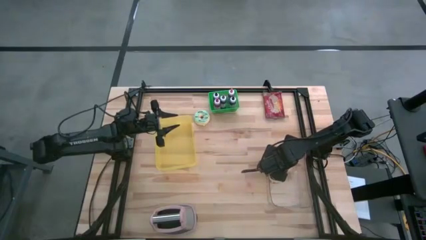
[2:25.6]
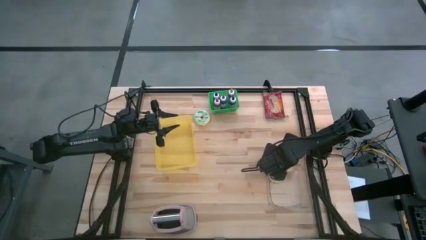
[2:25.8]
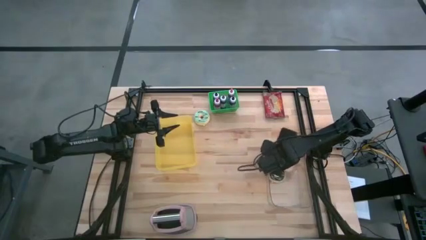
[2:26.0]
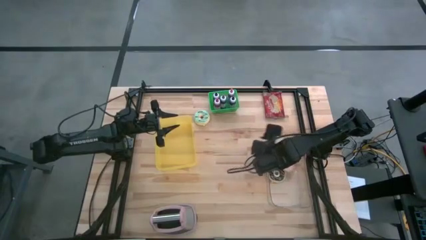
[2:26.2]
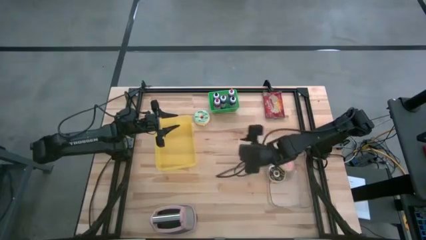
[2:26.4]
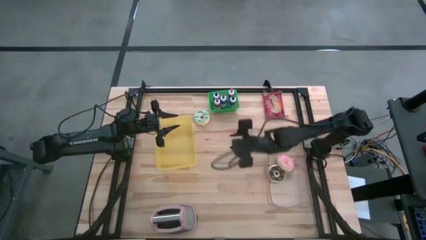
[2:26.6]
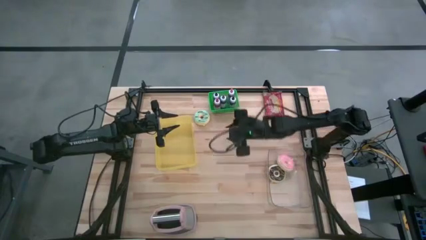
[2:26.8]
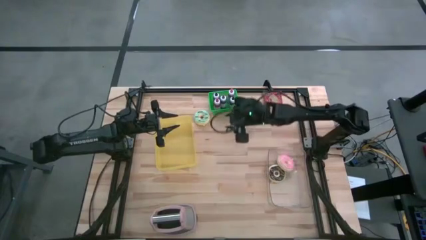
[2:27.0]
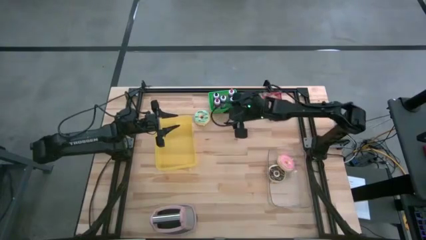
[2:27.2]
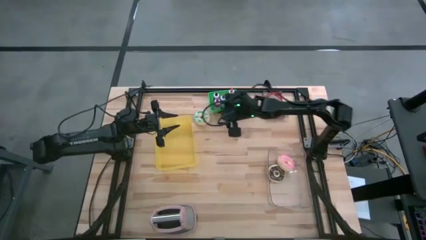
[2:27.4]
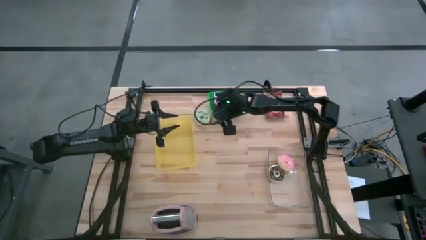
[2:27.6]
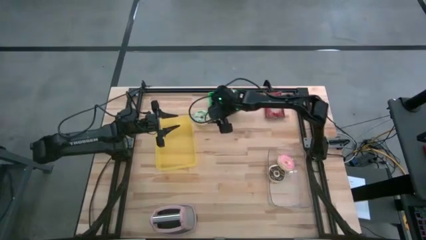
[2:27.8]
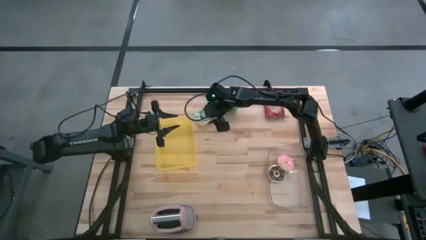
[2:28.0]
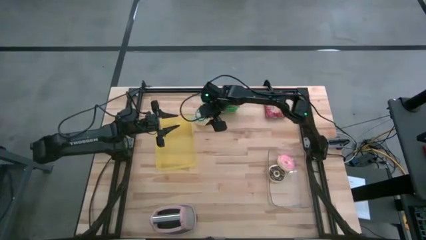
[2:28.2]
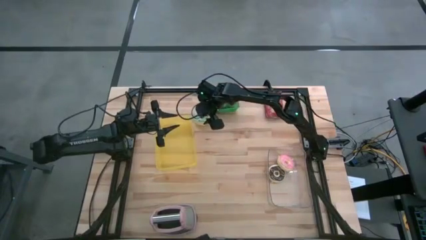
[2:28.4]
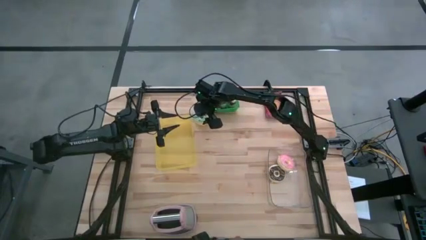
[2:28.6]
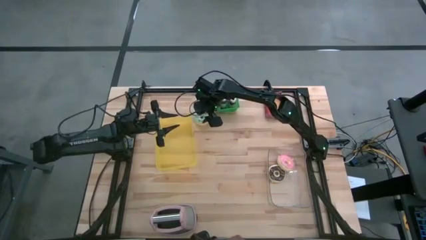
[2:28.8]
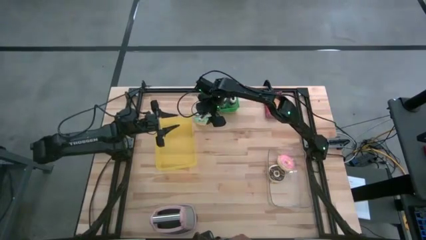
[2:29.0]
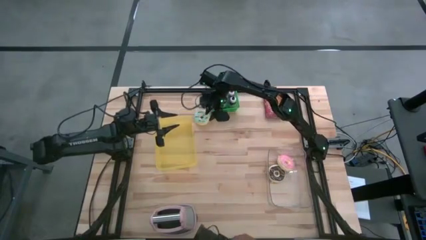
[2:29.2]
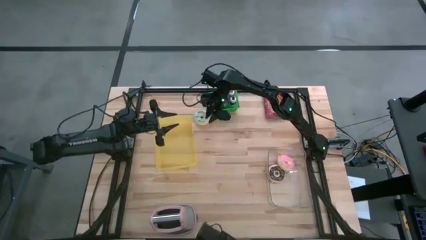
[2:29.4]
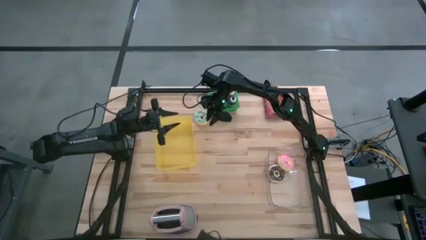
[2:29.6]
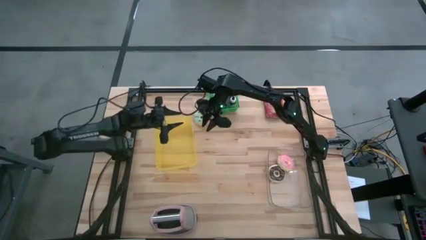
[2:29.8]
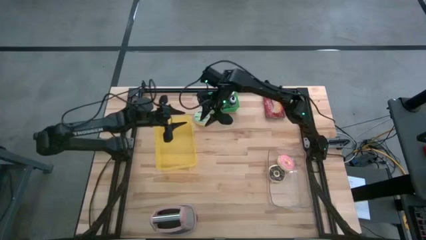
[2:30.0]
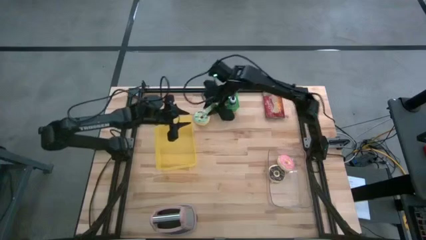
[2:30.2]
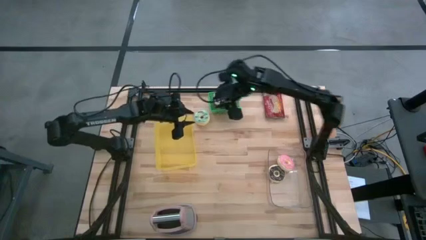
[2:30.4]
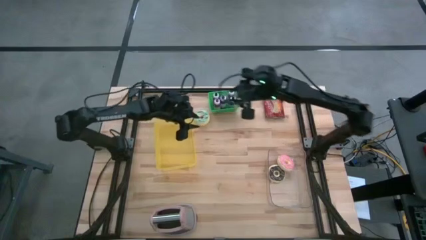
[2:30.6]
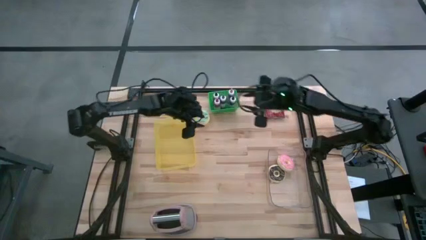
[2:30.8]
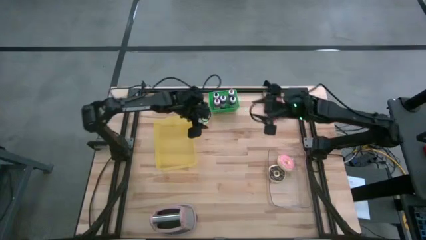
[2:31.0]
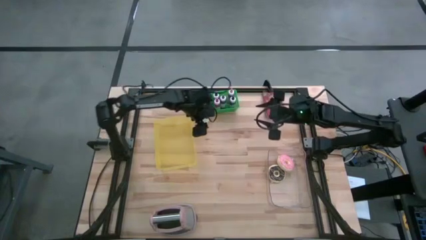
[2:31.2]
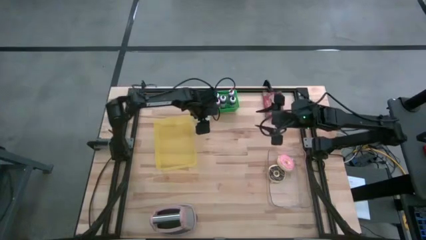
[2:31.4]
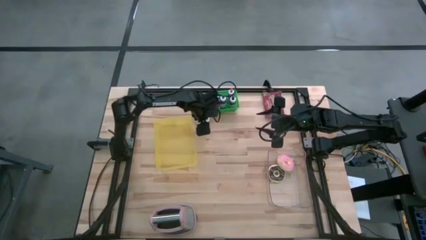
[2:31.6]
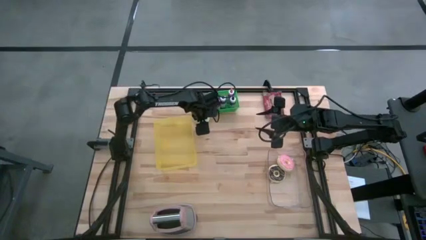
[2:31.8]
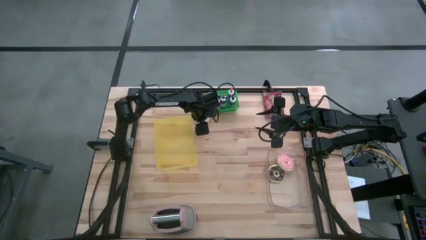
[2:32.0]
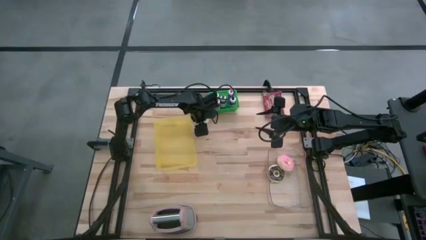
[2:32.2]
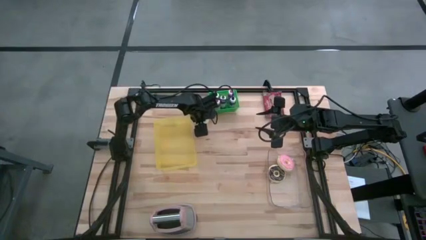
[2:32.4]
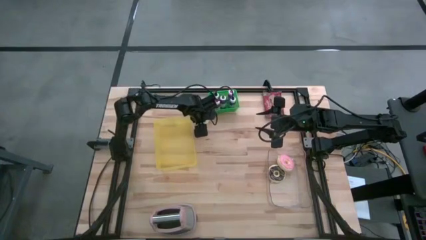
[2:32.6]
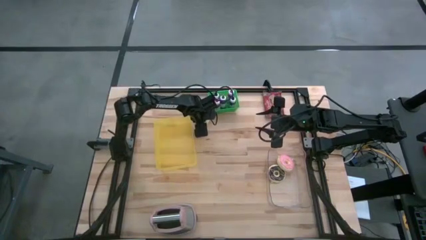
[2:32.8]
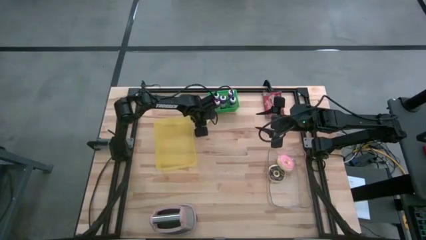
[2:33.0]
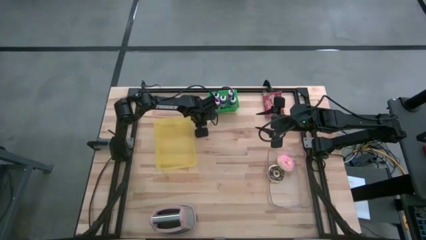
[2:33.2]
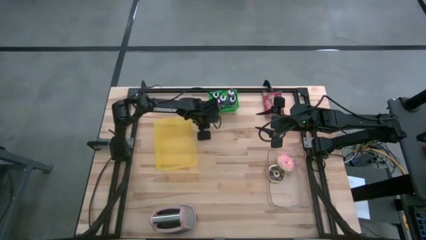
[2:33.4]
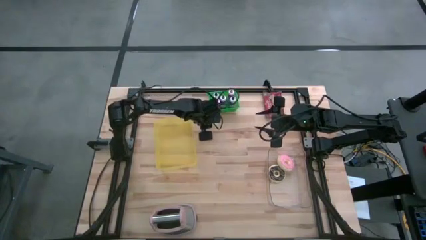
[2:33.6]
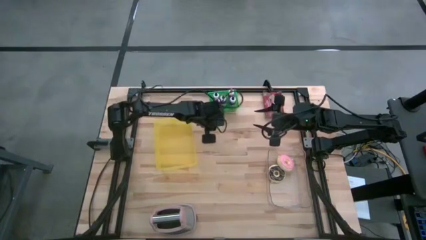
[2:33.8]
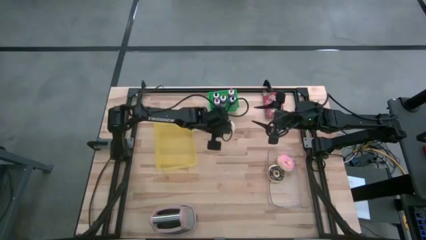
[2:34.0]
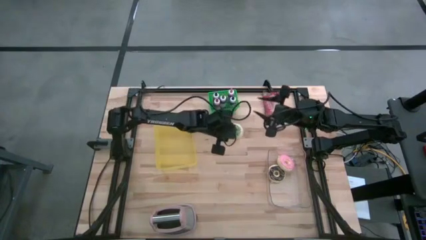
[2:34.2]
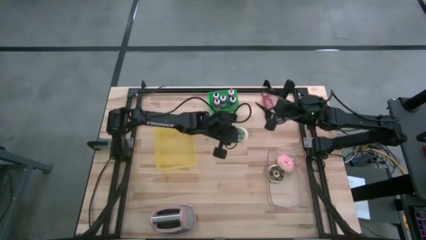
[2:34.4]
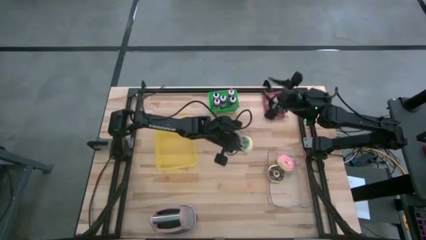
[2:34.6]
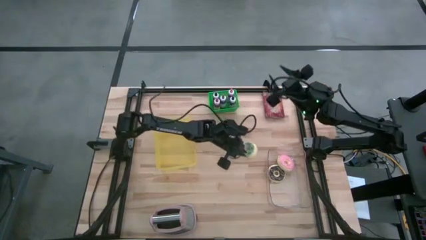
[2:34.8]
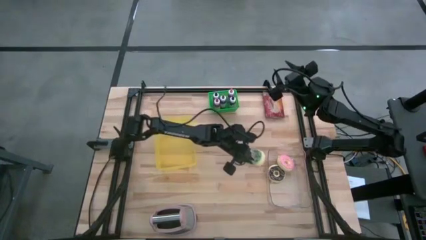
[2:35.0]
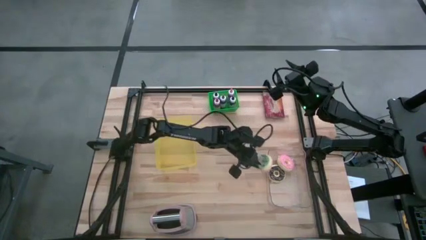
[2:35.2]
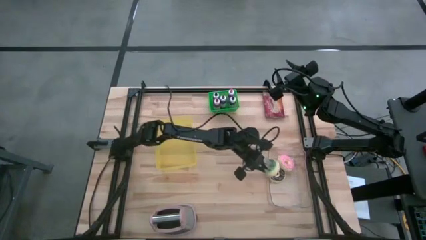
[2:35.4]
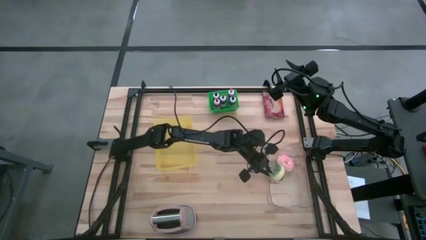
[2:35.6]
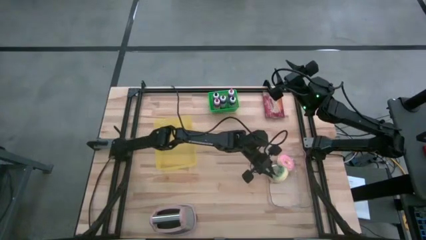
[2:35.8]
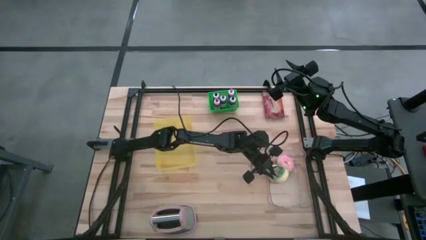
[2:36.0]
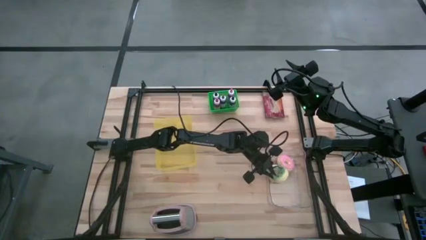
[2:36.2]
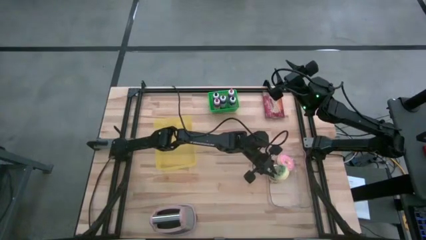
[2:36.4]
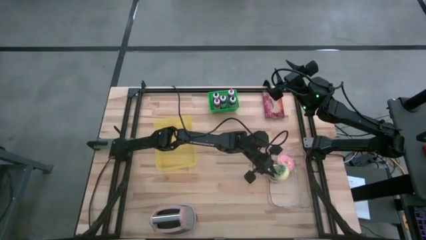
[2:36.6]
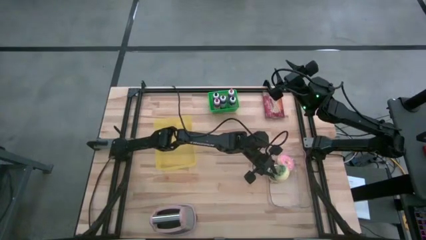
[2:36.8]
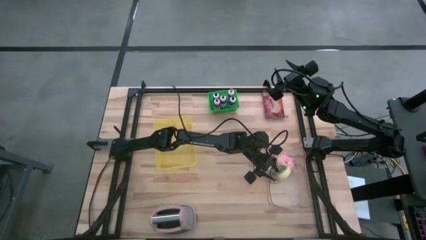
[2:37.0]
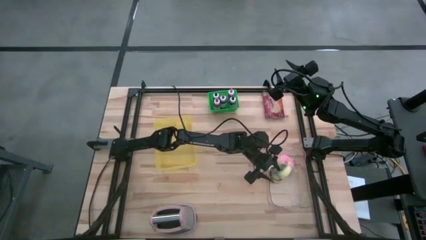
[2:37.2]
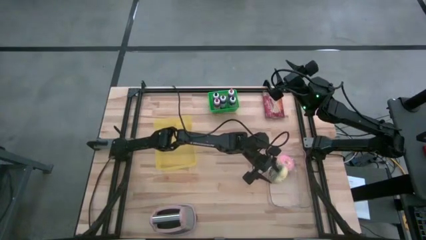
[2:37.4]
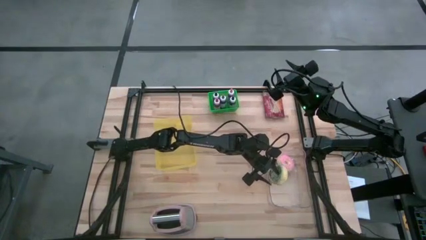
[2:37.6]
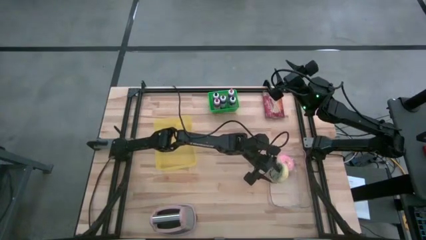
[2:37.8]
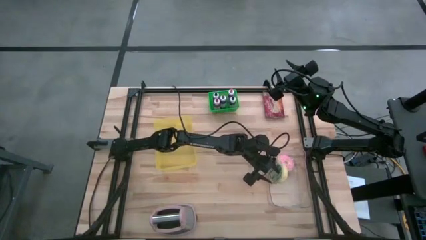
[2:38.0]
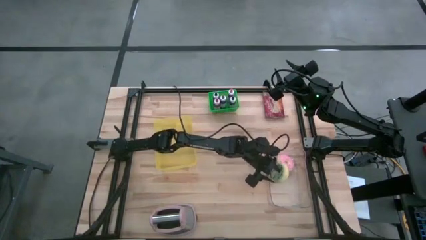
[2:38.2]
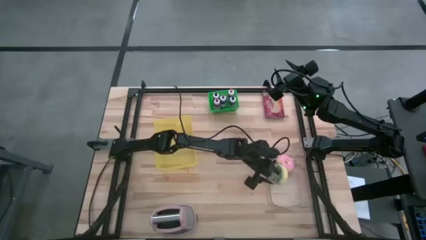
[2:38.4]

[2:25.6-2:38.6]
Task: Pick & Place Food Item
Put the blue donut into the transparent bin

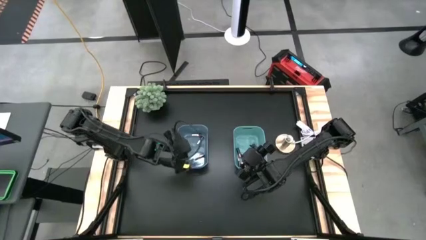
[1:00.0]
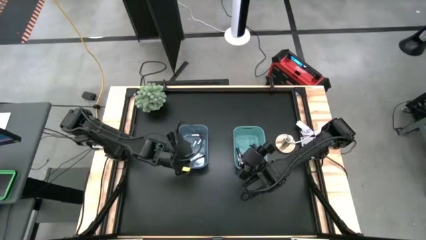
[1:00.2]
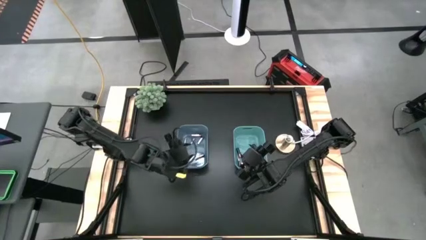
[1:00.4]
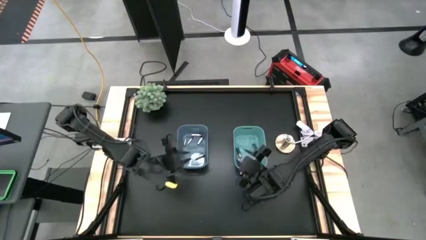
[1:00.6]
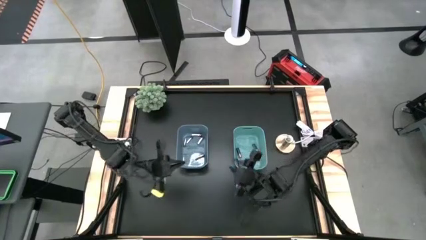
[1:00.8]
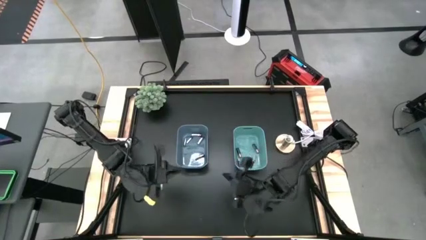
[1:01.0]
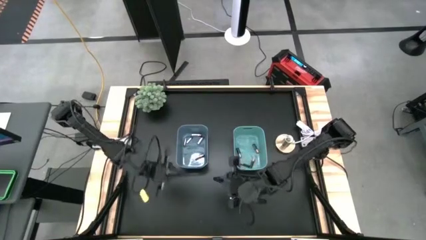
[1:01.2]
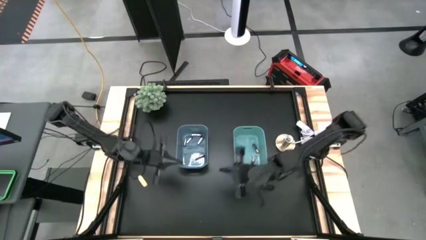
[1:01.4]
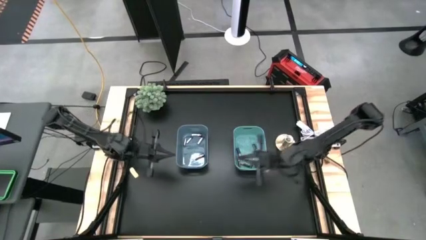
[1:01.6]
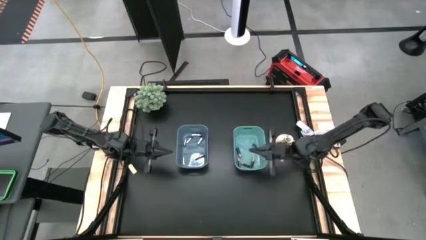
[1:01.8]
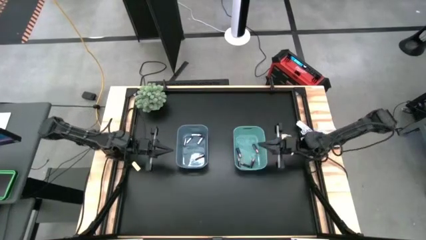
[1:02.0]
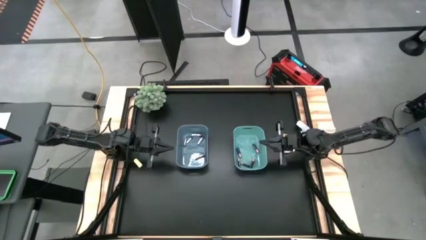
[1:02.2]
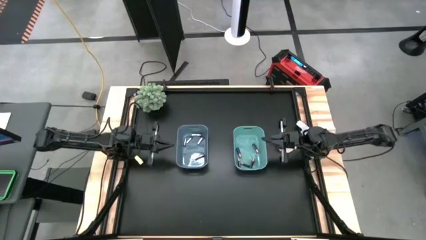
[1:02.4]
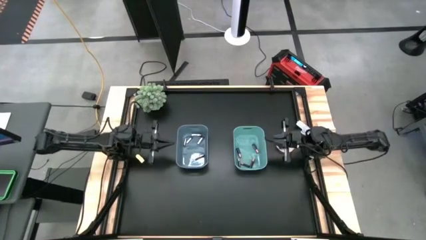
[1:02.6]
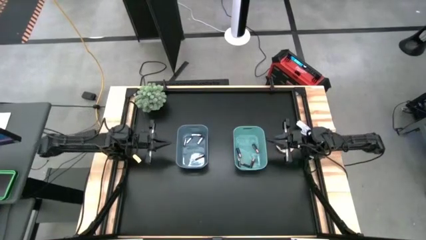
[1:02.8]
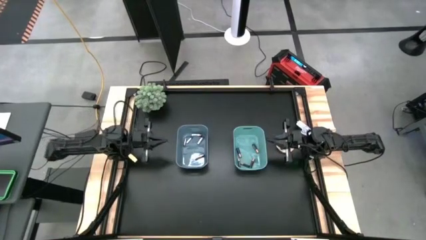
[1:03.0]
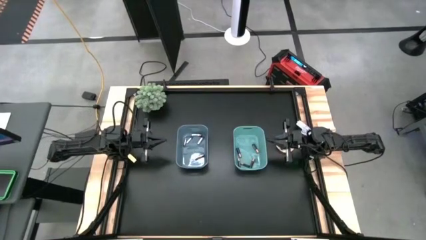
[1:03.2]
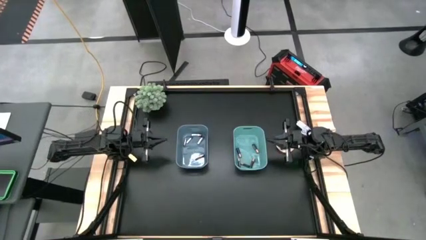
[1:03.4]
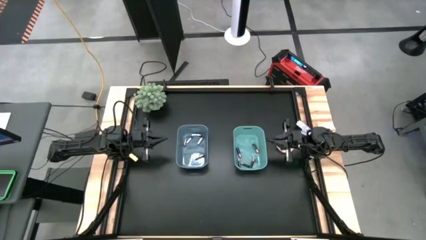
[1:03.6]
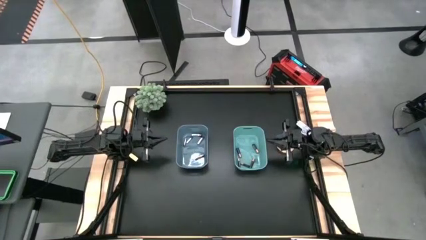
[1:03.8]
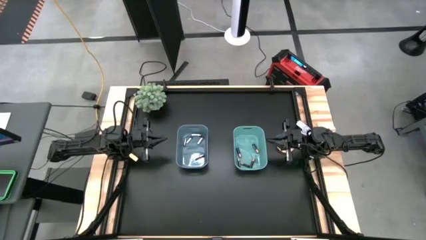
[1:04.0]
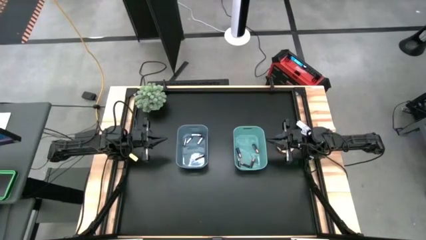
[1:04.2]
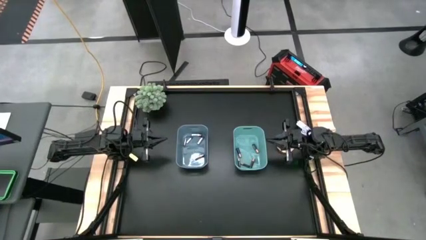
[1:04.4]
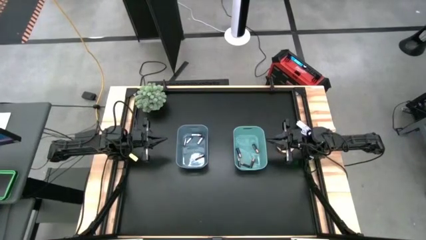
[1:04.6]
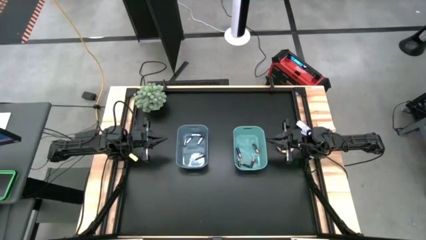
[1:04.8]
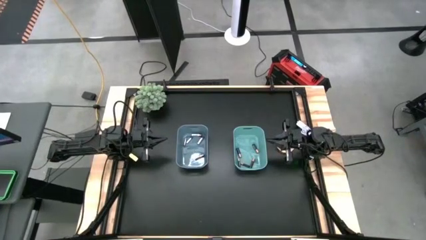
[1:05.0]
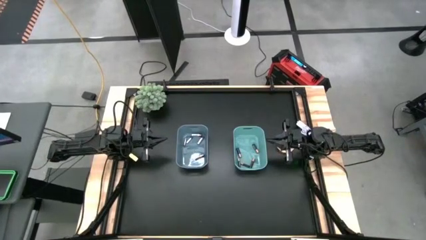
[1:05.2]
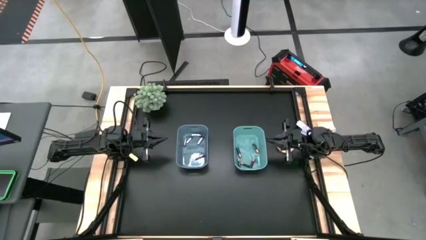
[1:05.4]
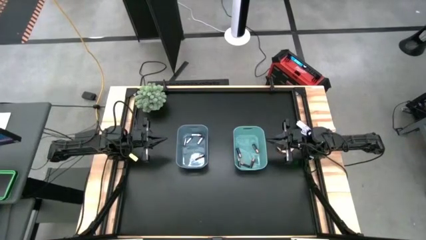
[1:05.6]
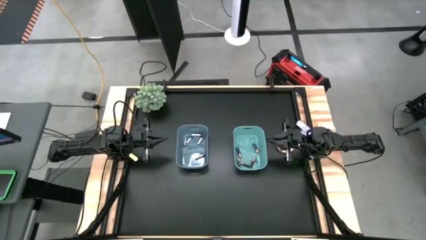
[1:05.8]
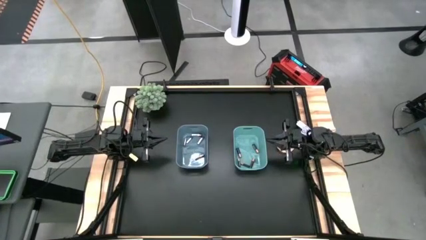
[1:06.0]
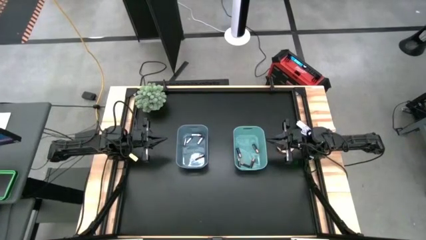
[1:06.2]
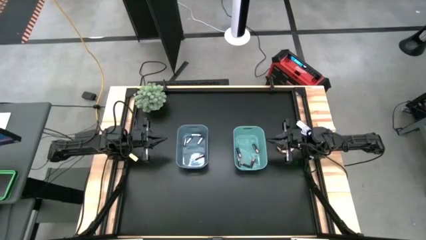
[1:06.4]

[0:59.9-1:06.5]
Task: Sort batteries
Return to Home Position
